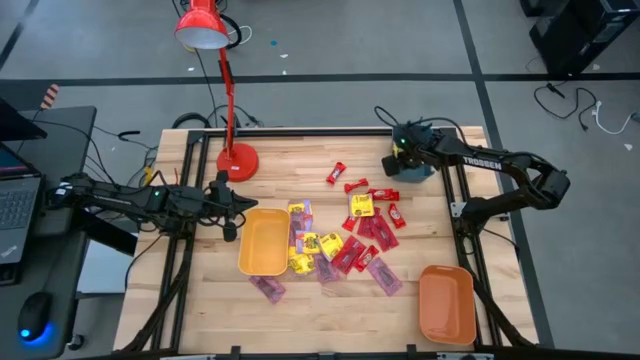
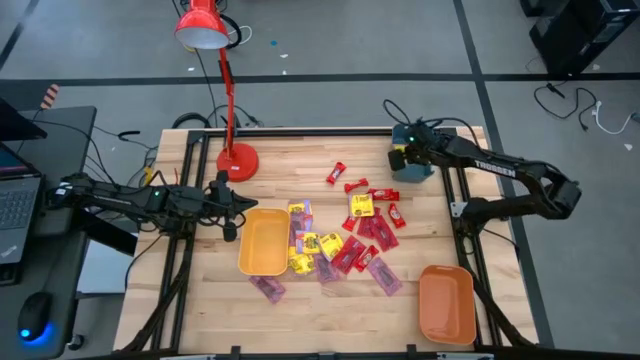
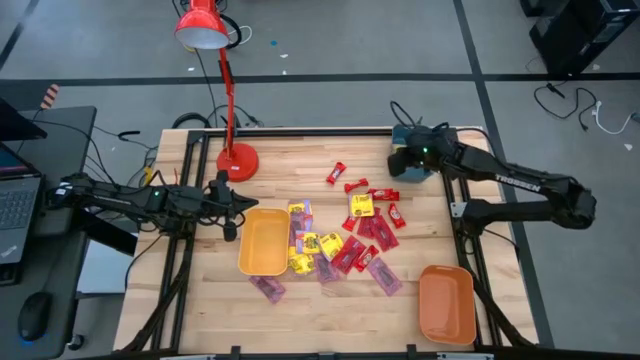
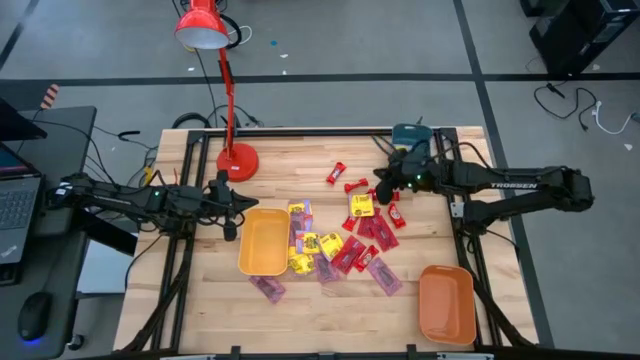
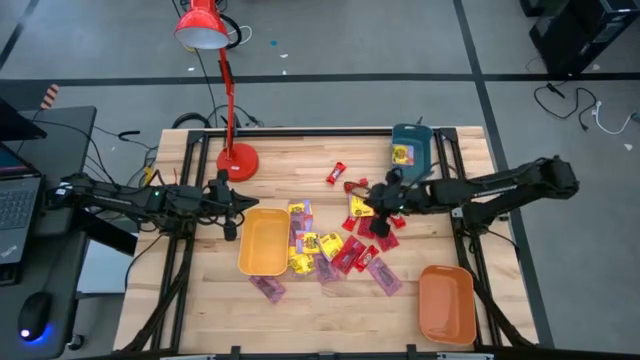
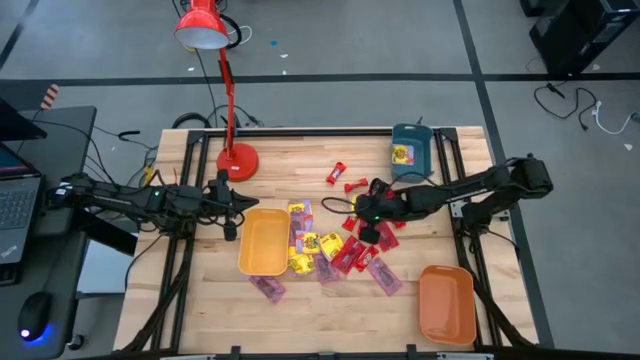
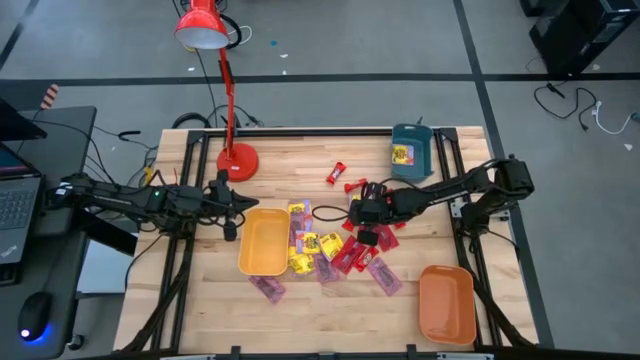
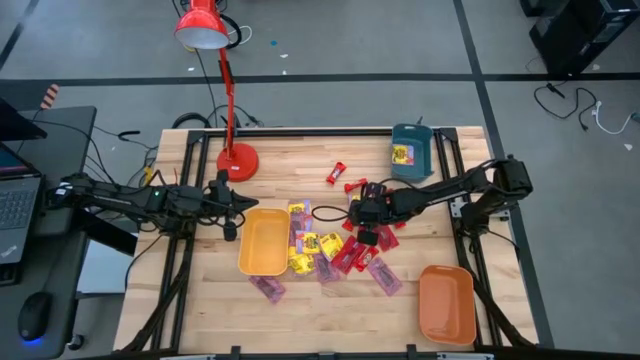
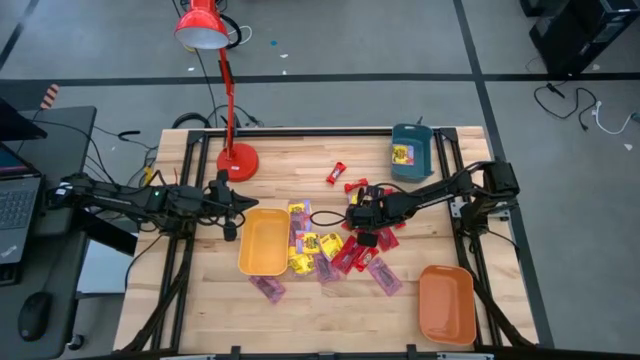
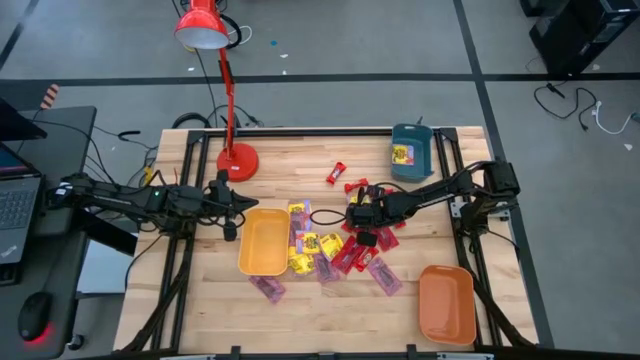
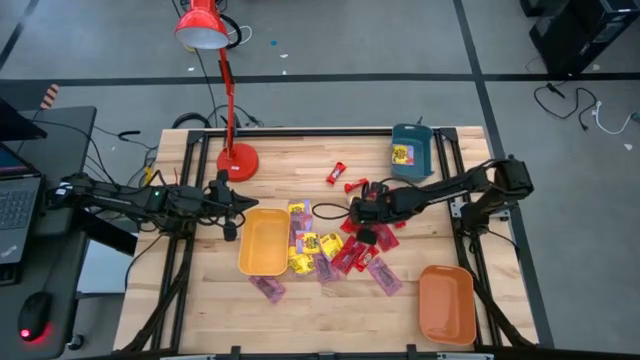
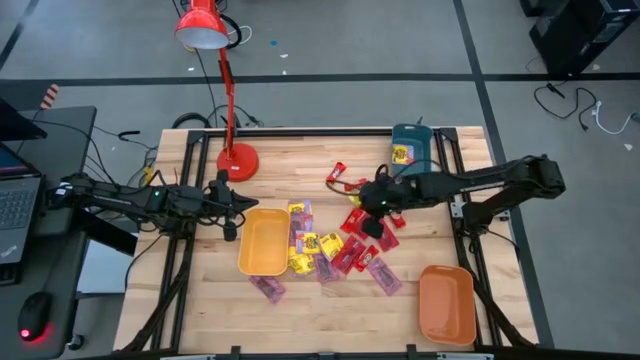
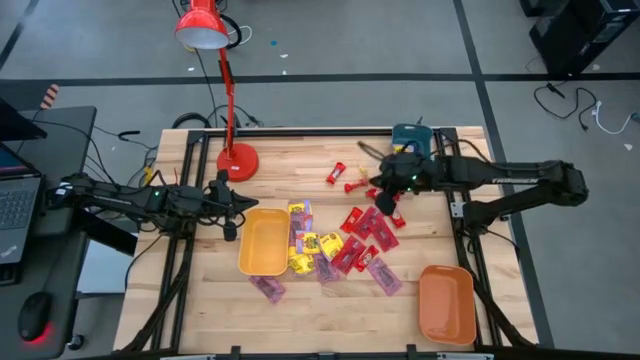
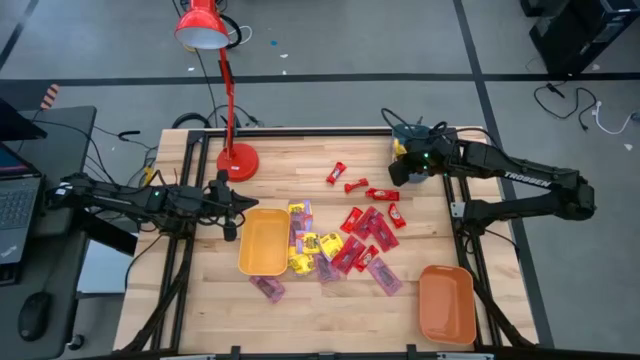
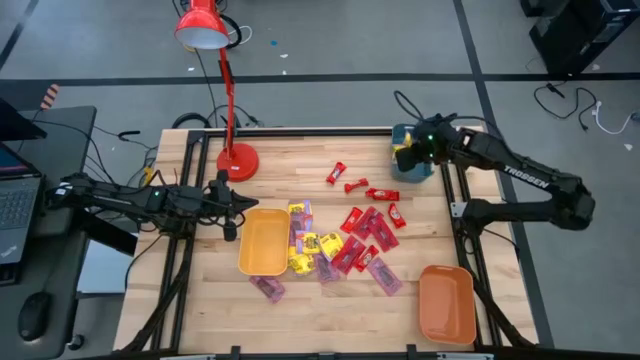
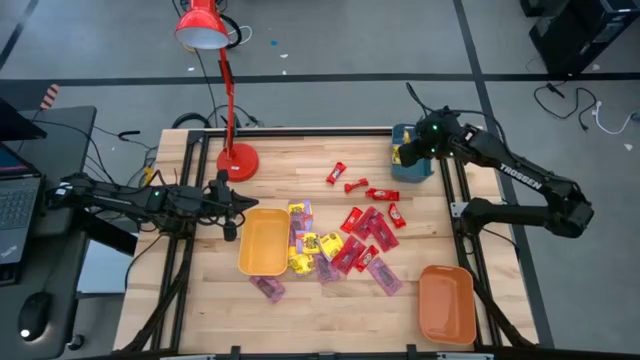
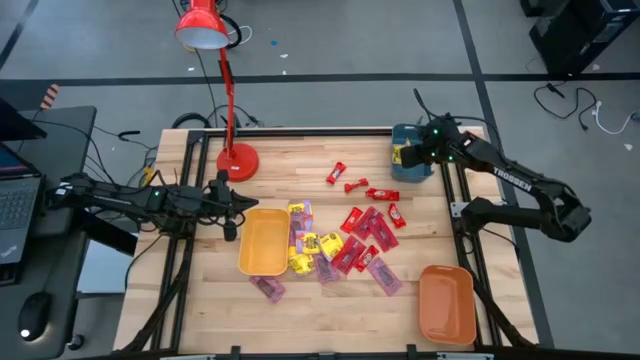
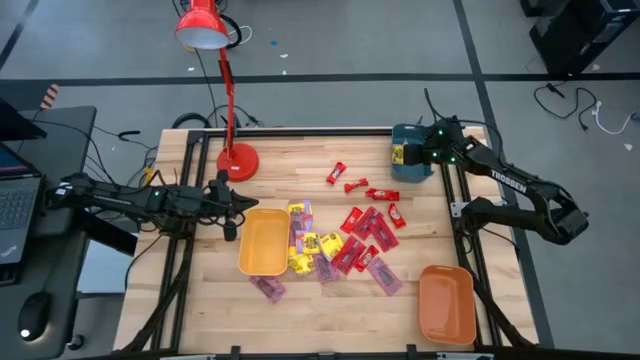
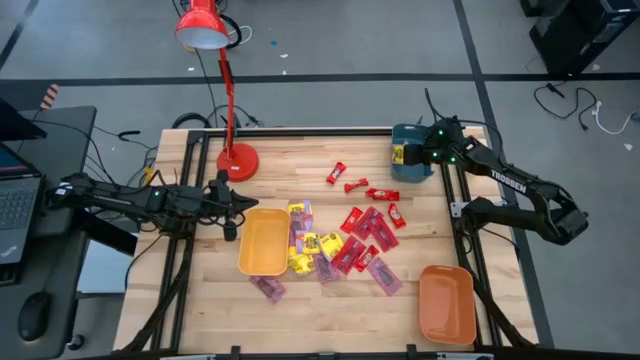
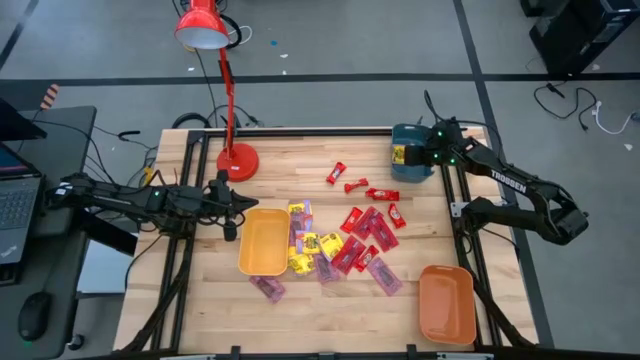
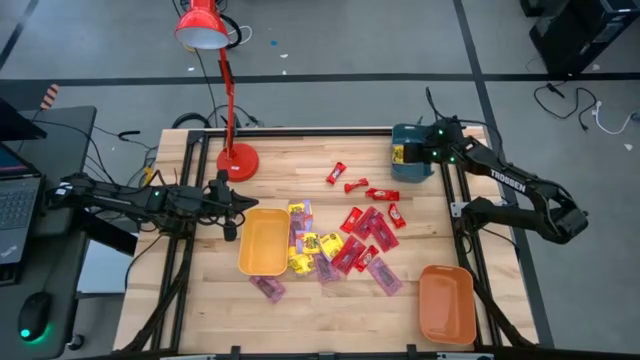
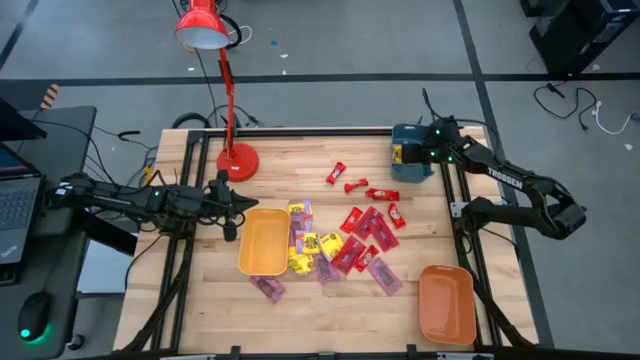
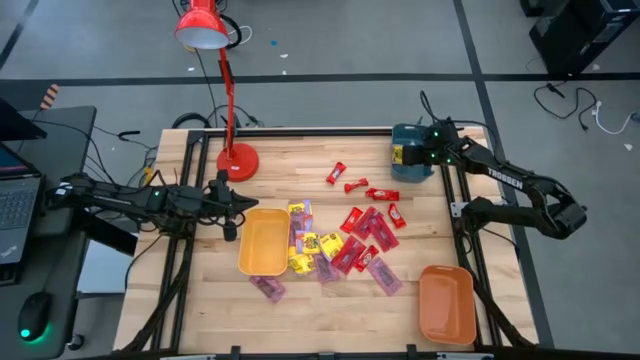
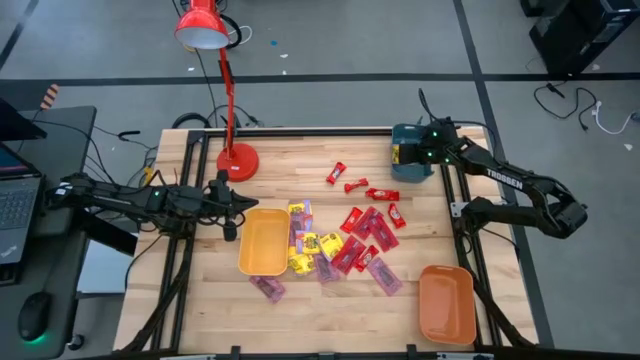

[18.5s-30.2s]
Task: Sort candy
Put the yellow candy pack into the blue bin

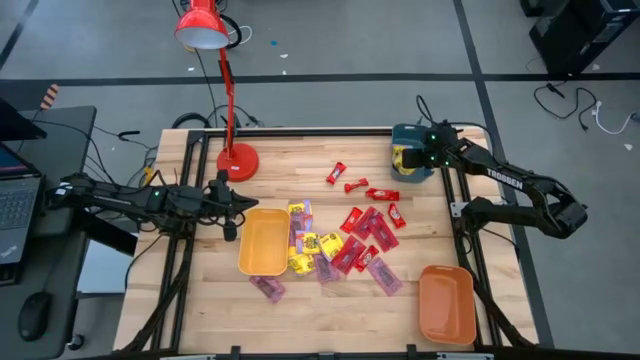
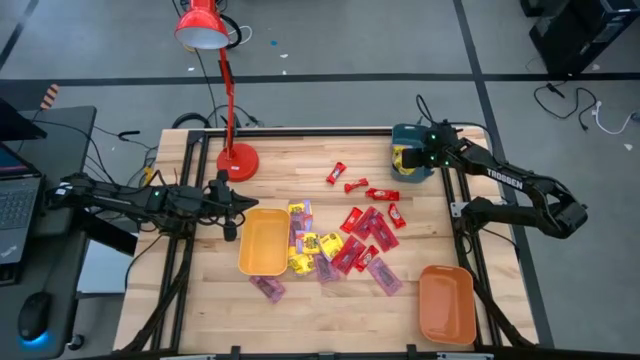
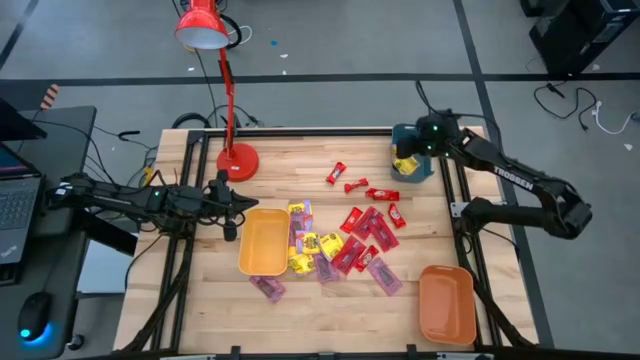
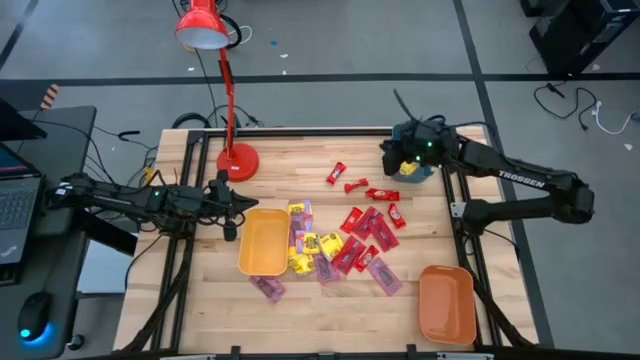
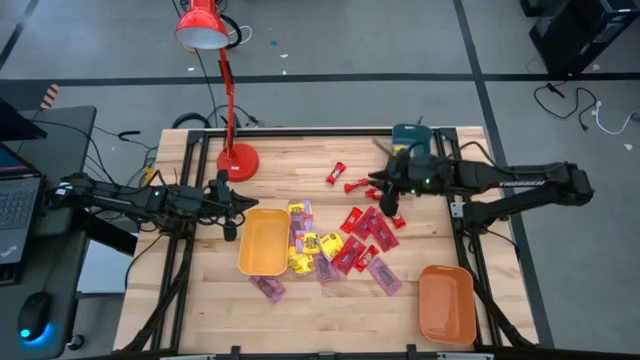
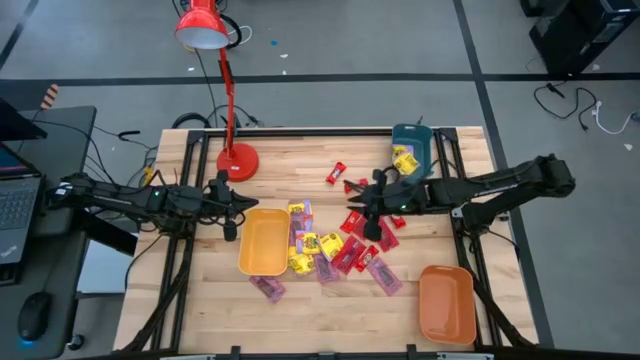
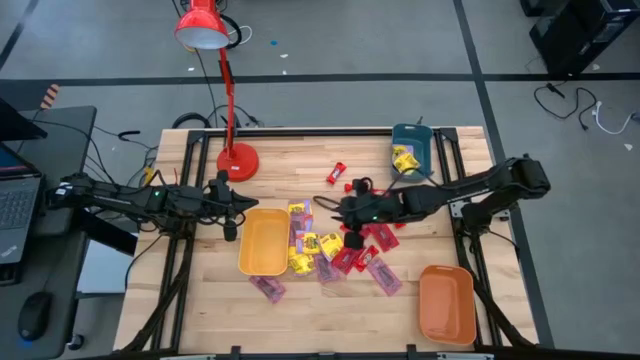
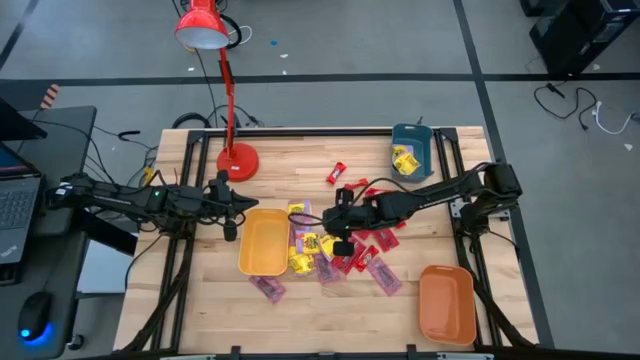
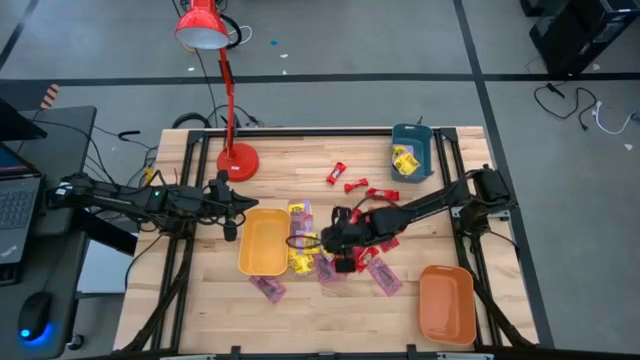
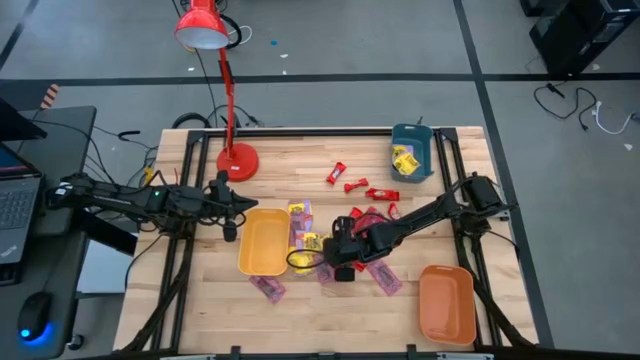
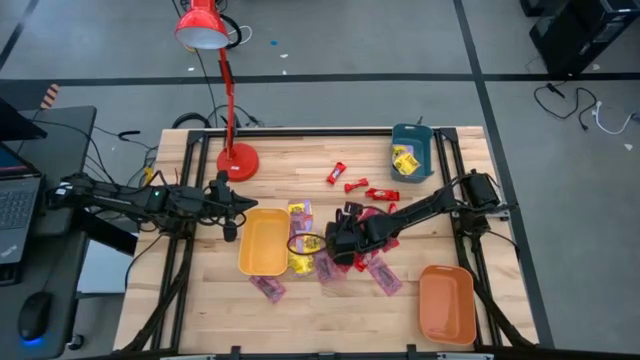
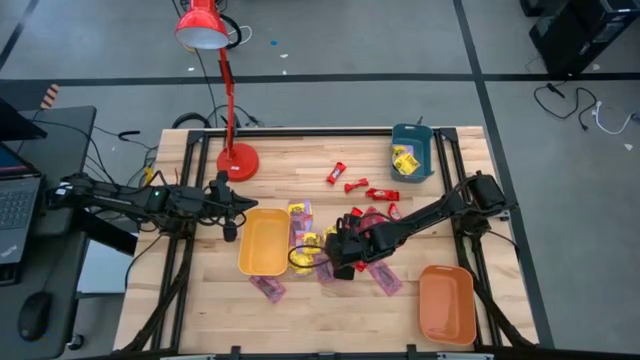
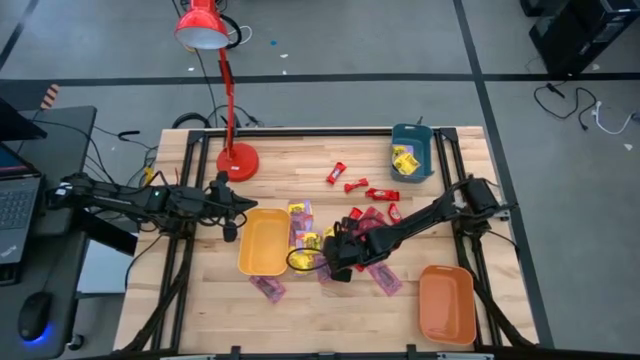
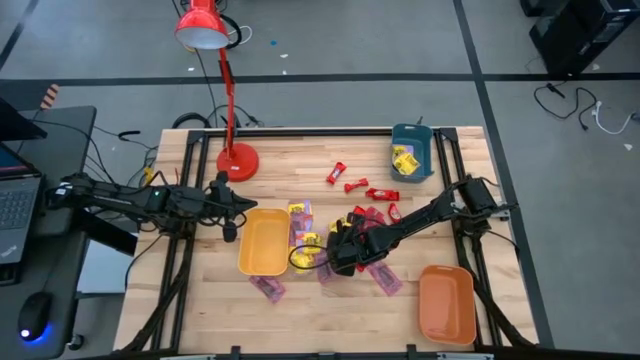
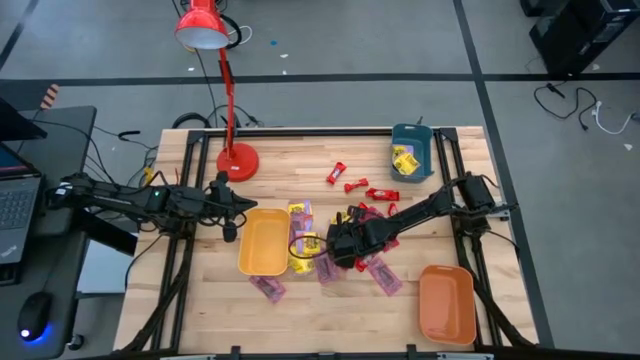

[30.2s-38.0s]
Put the yellow candy pack into the blue bin
